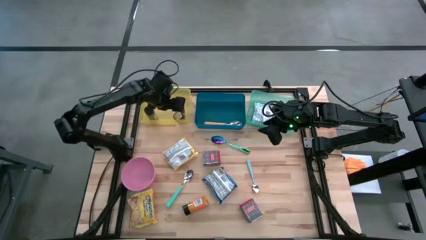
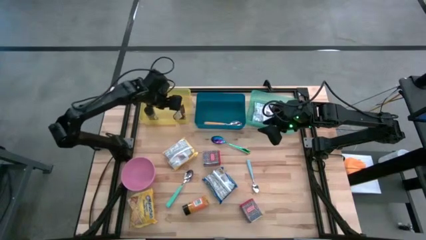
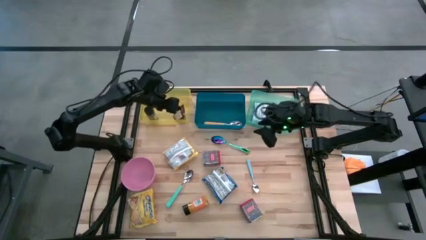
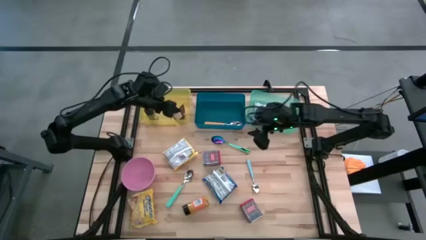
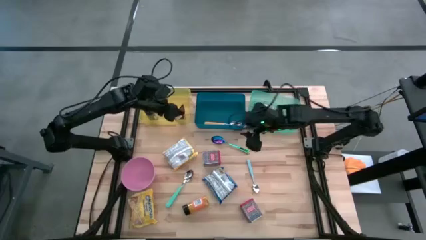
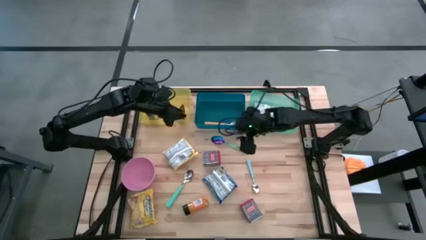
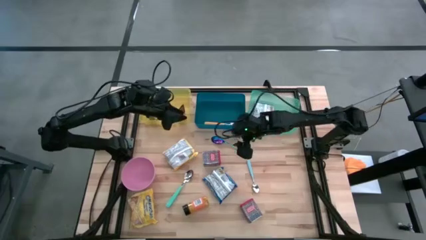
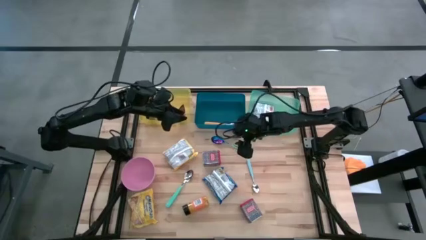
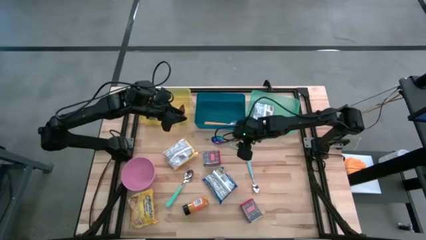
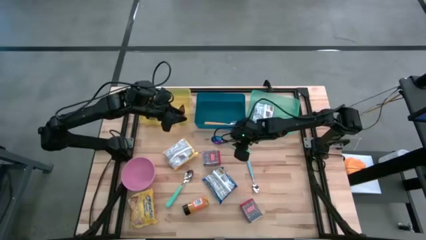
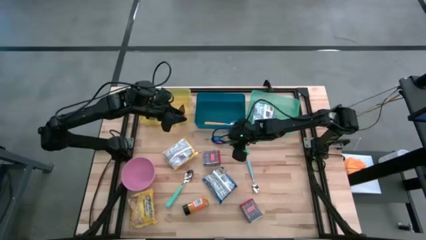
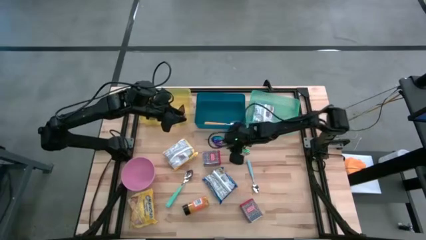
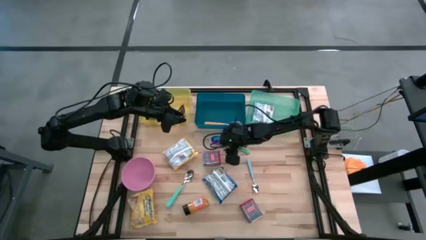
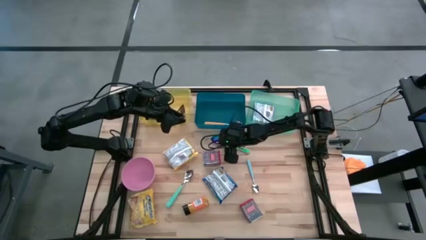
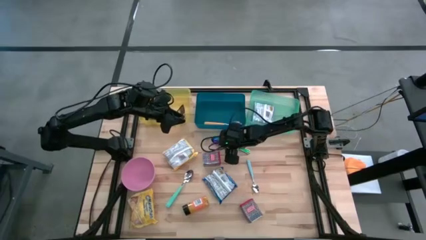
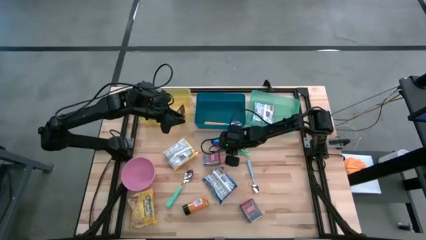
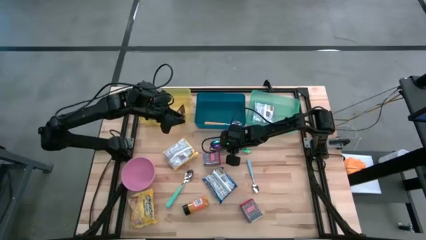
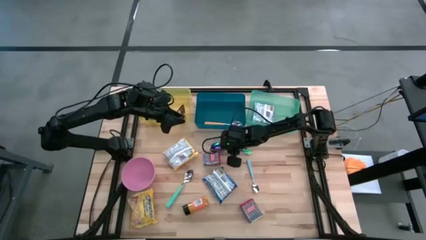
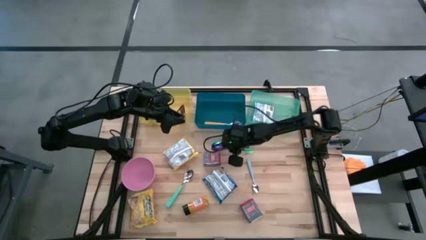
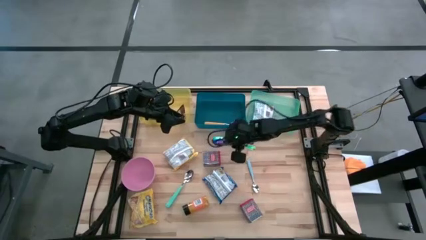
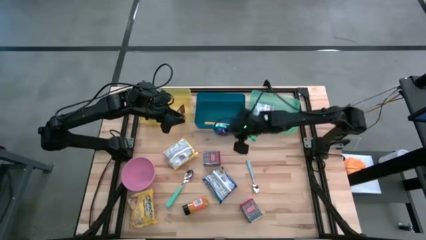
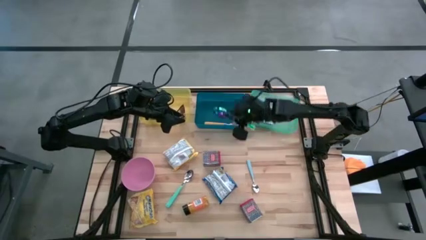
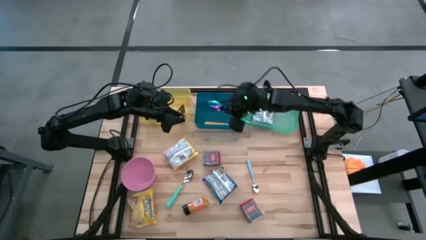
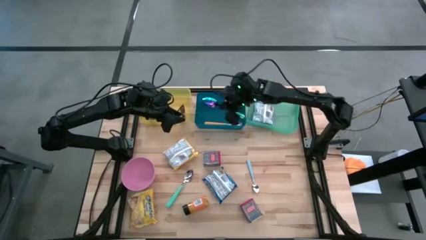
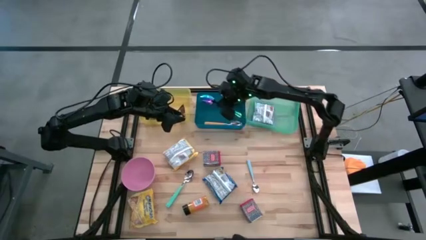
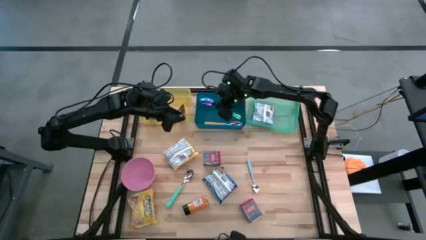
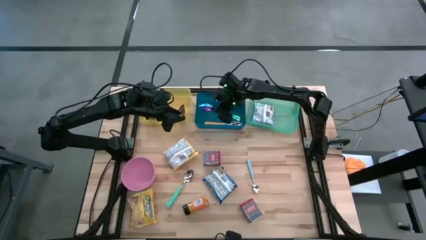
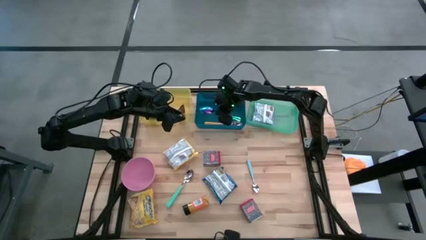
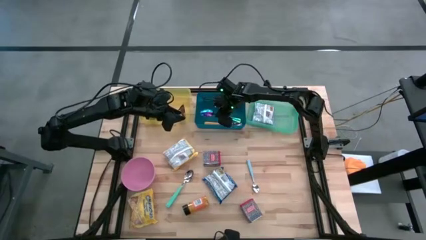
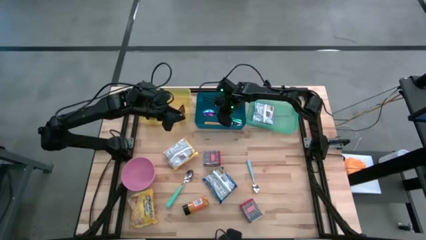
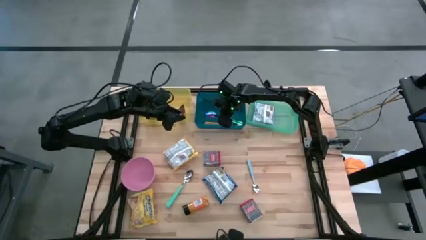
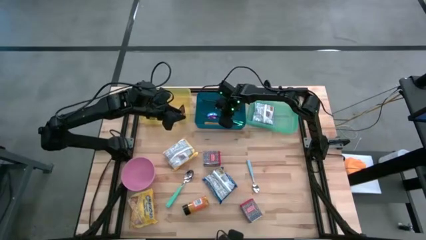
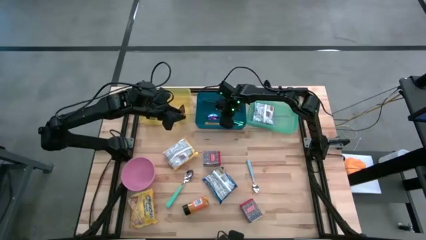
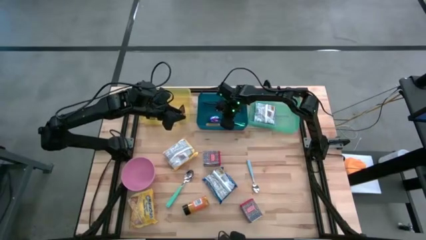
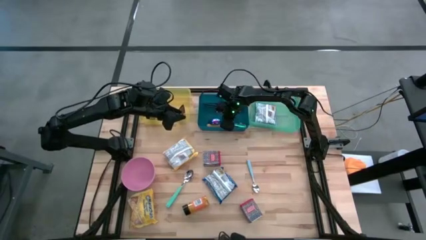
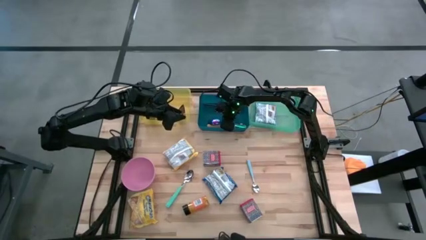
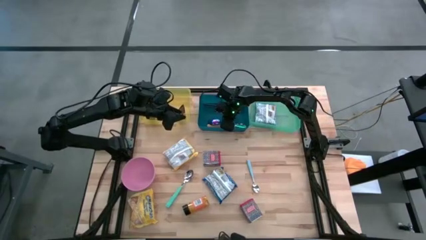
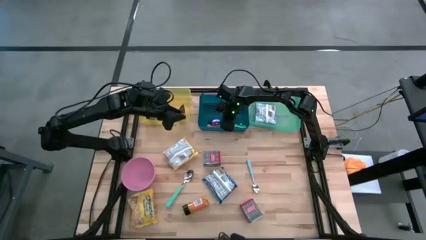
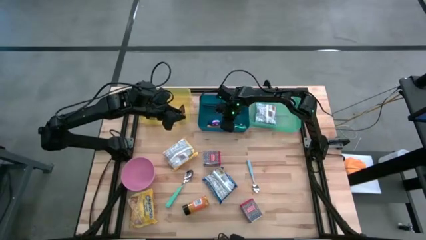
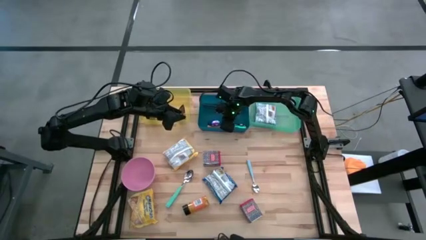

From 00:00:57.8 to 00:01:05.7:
Put the purple spoon into the blue bin

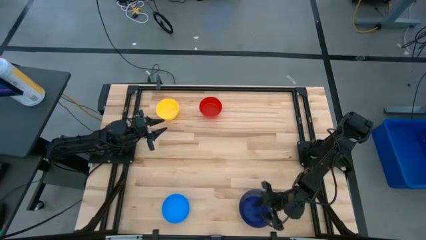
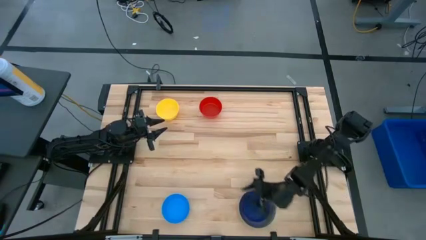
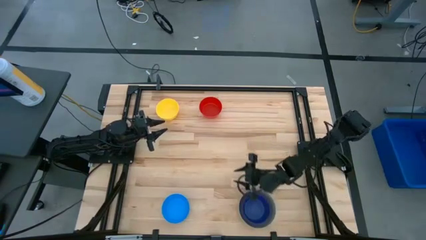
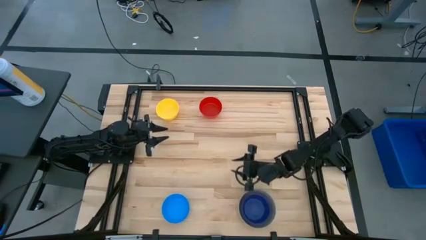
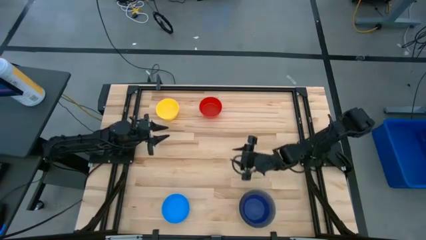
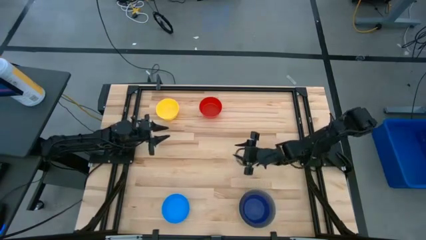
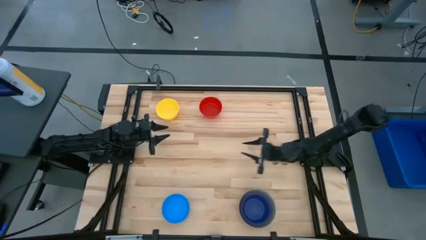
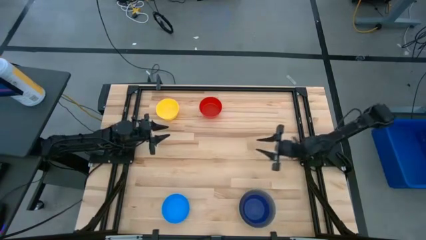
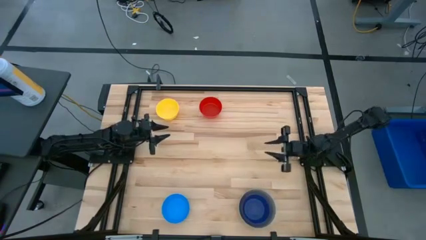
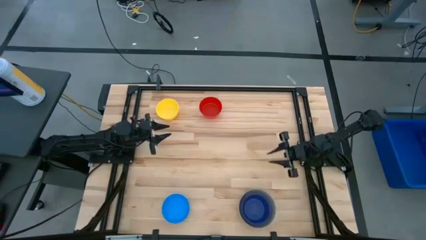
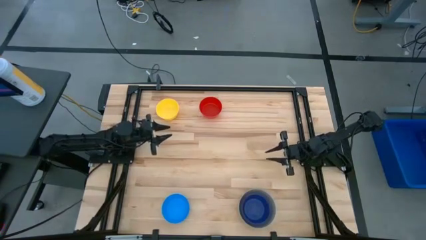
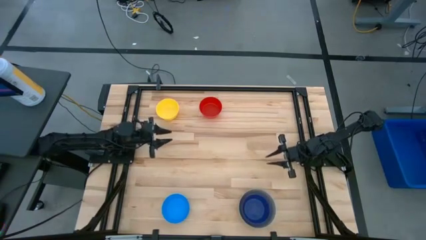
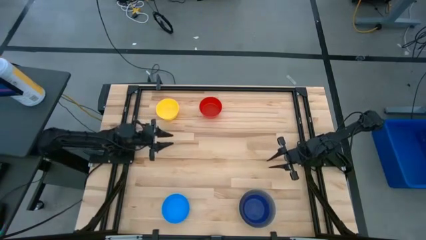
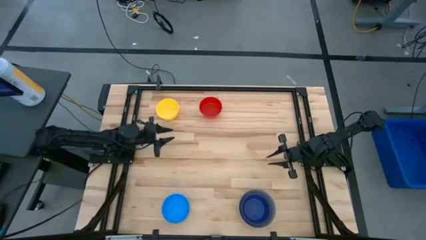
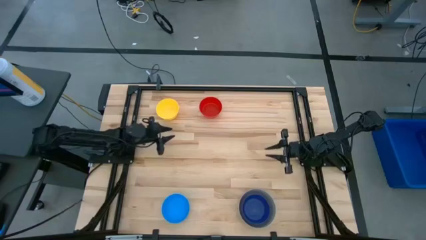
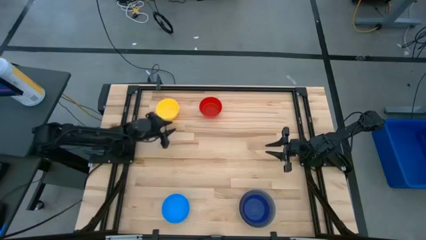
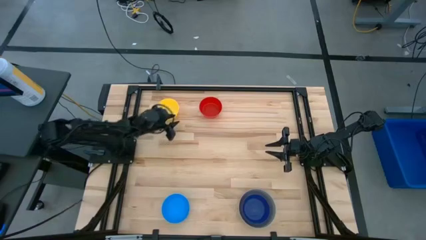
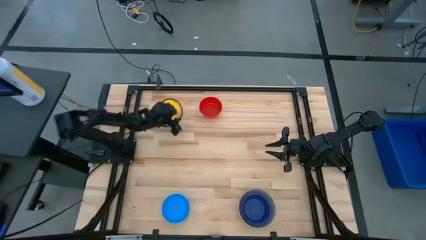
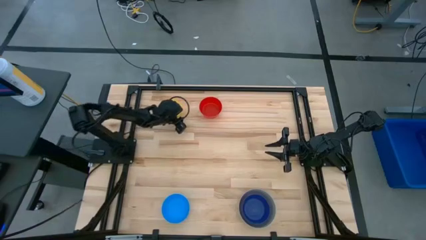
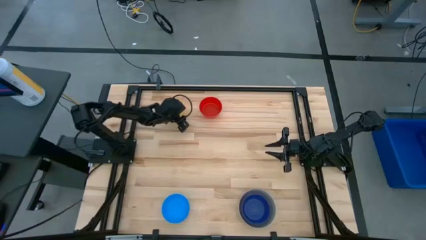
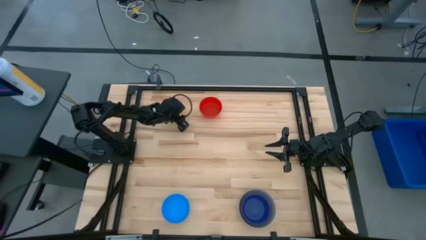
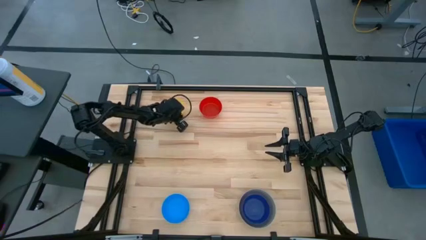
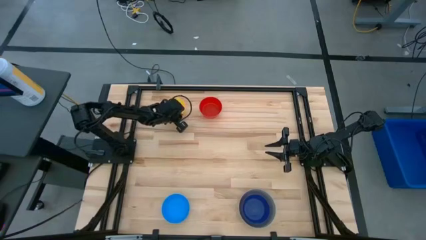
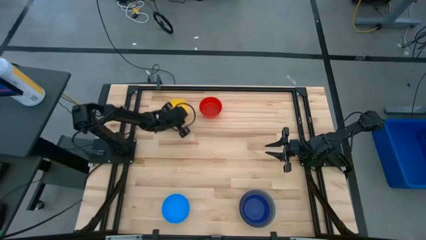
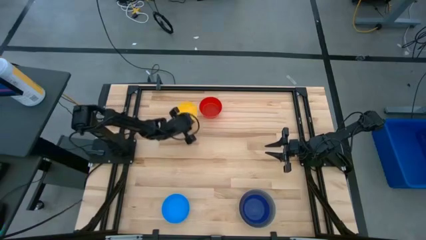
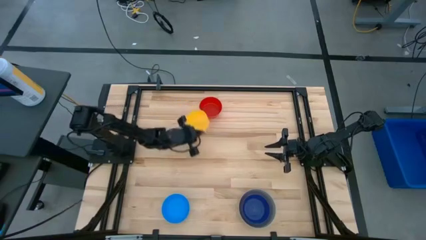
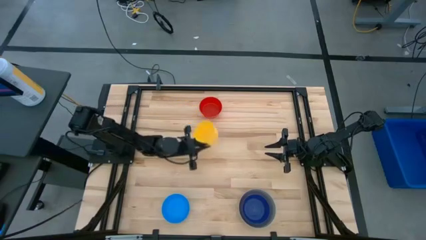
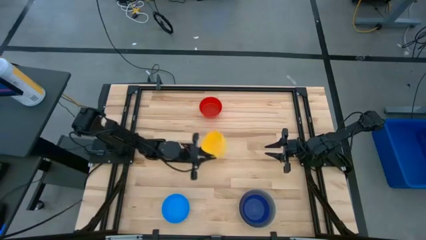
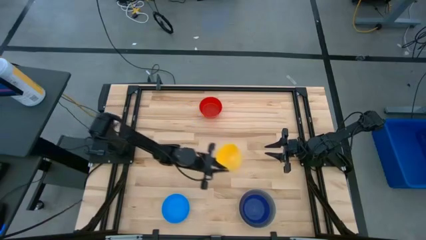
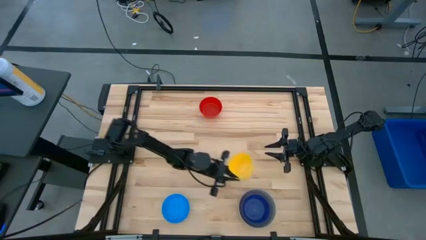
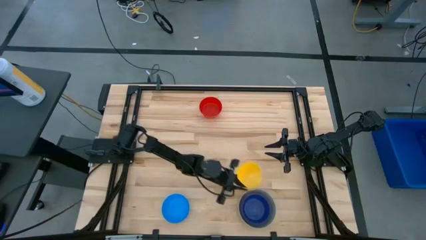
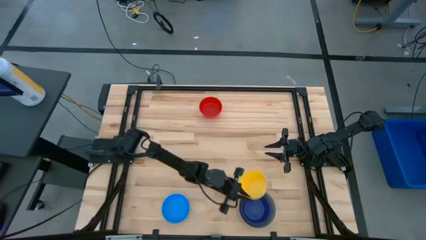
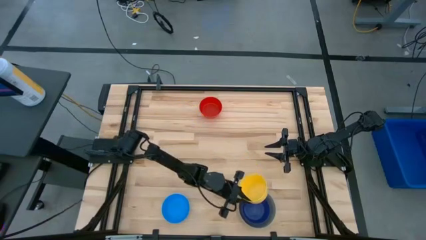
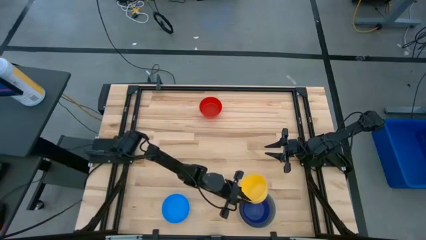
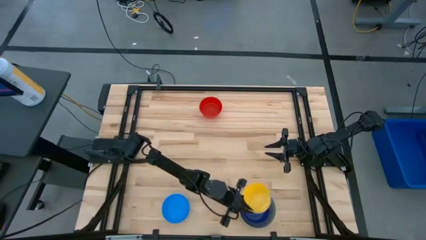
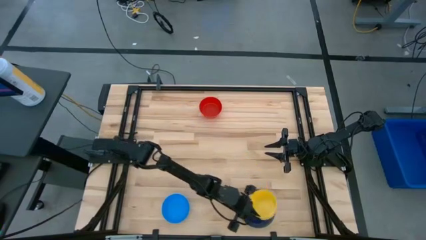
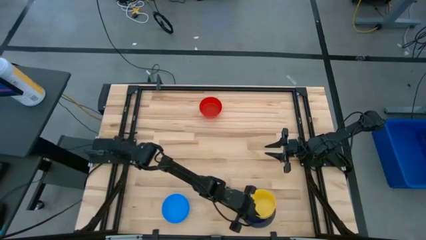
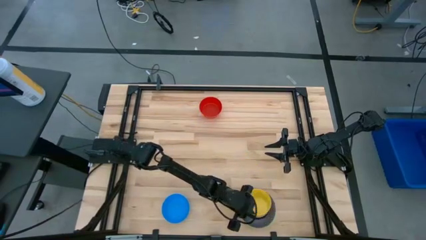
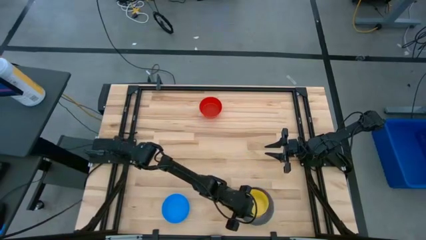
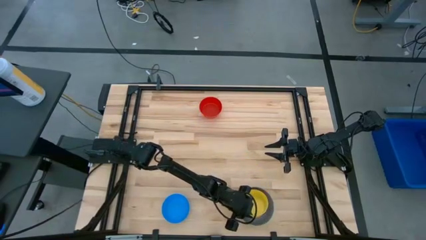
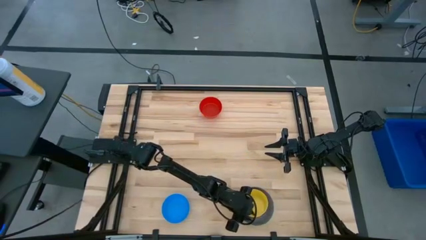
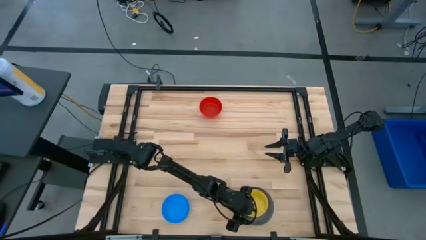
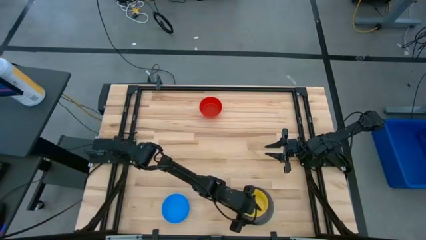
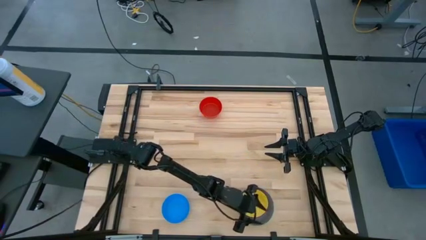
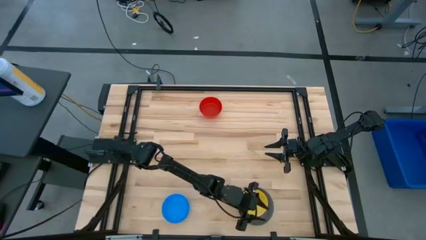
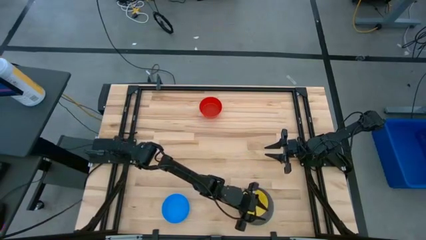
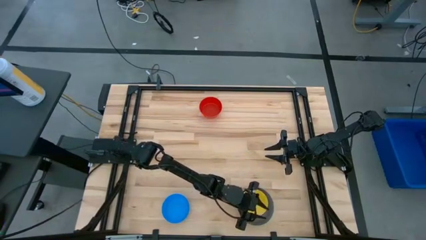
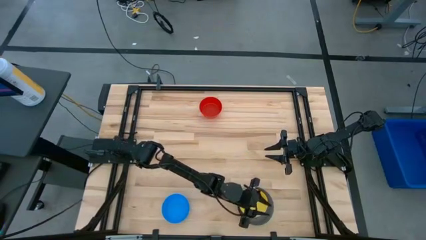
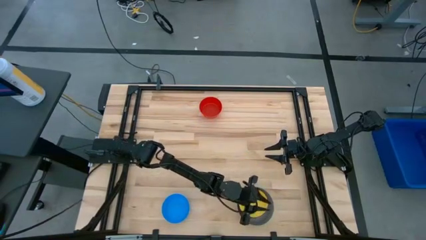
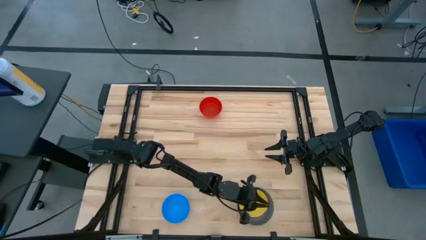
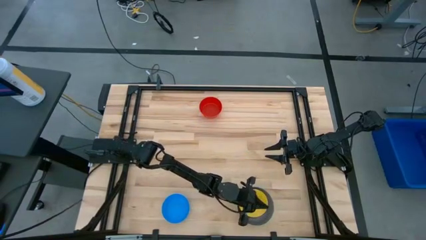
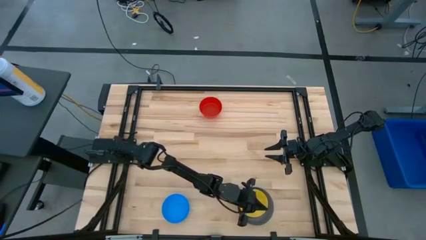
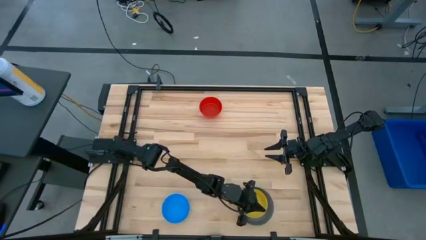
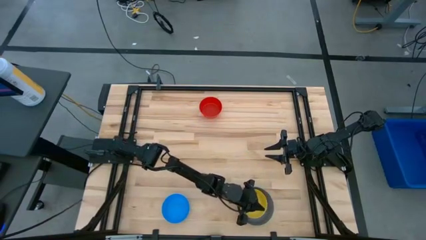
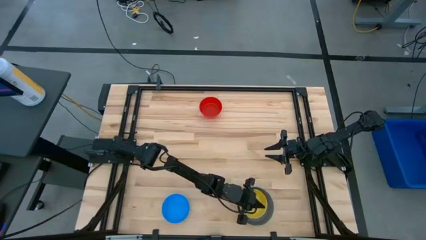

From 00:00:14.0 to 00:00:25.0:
Stack the yellow bowl on the blue bowl
